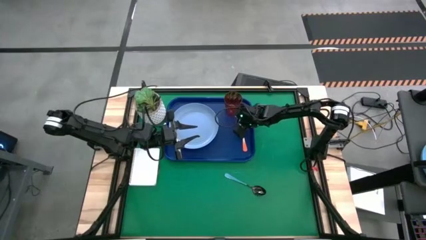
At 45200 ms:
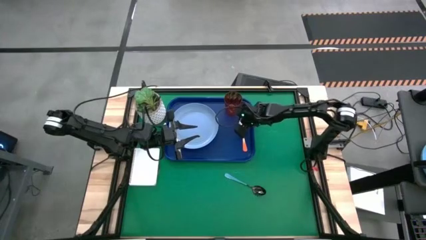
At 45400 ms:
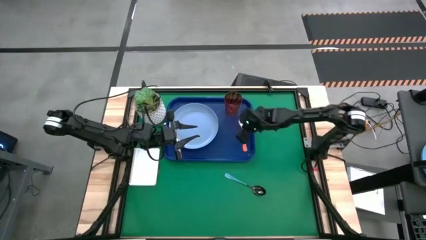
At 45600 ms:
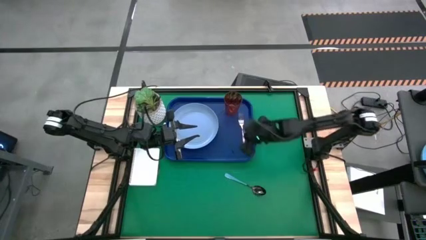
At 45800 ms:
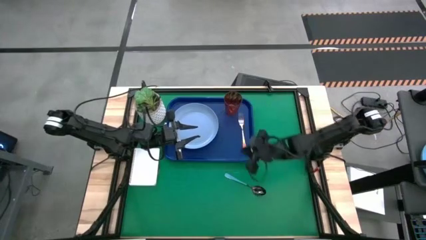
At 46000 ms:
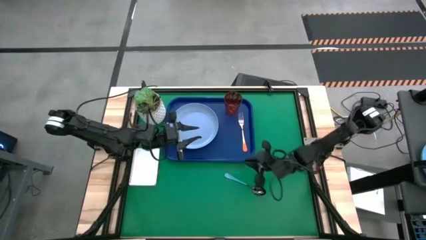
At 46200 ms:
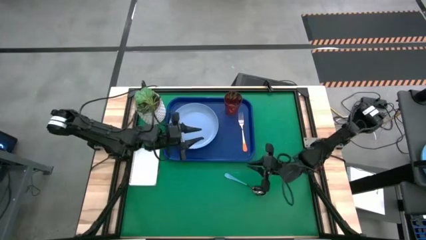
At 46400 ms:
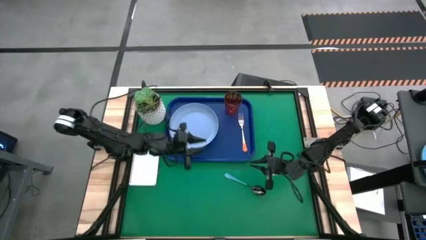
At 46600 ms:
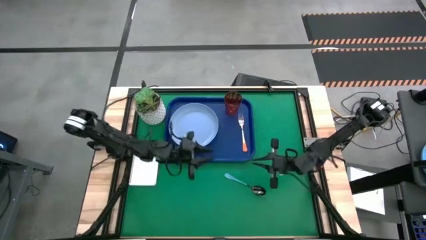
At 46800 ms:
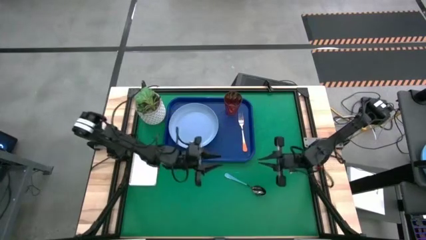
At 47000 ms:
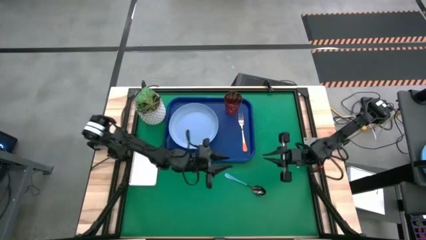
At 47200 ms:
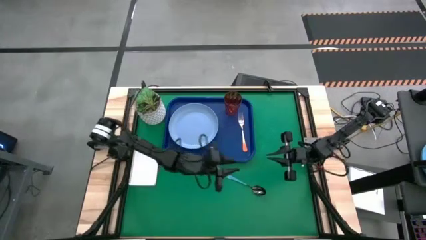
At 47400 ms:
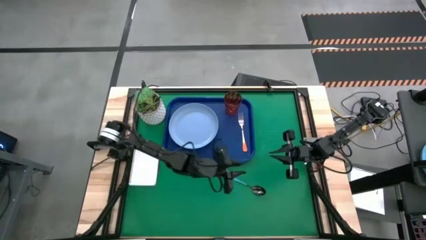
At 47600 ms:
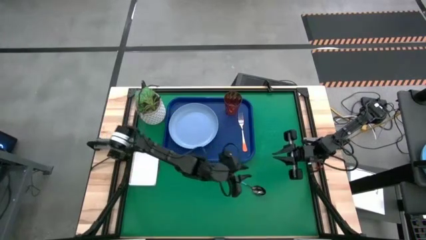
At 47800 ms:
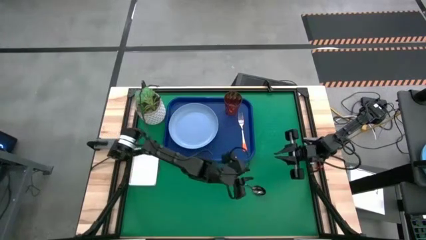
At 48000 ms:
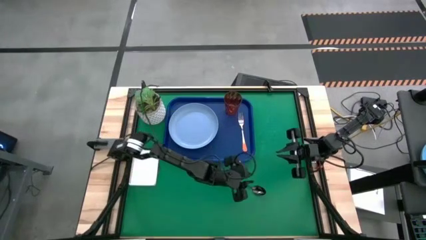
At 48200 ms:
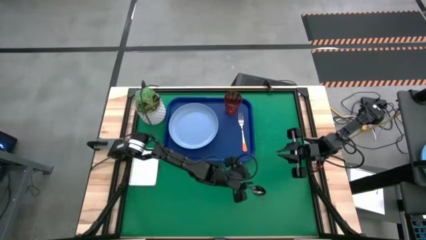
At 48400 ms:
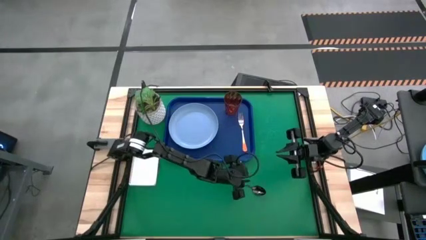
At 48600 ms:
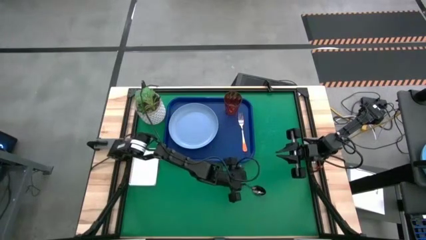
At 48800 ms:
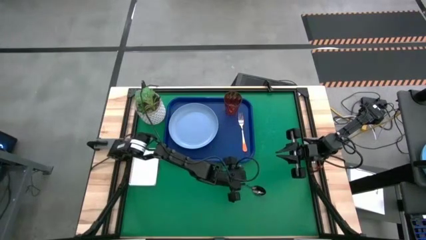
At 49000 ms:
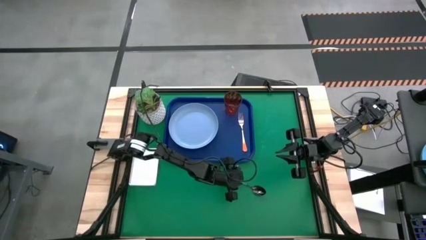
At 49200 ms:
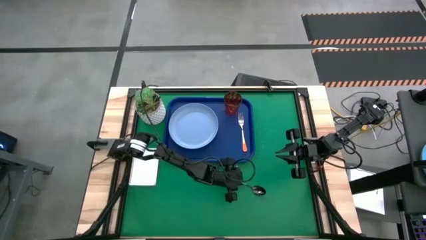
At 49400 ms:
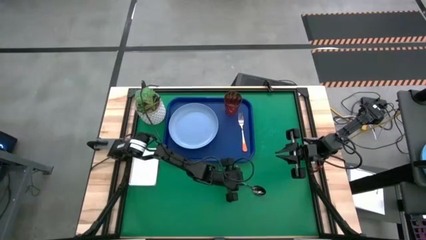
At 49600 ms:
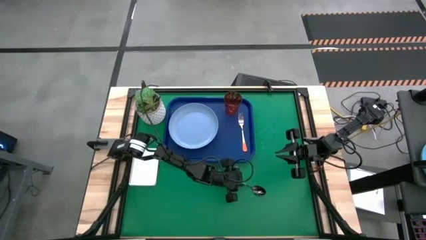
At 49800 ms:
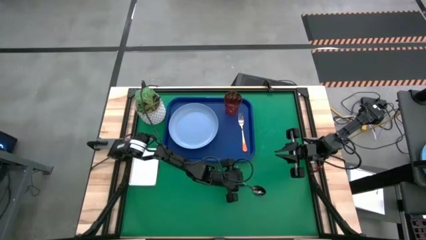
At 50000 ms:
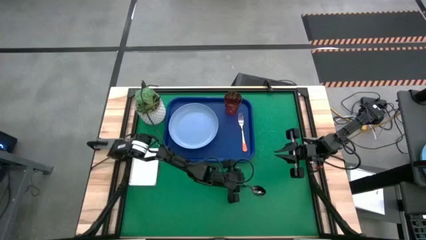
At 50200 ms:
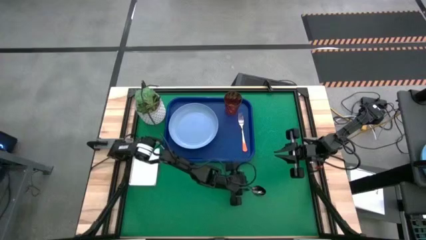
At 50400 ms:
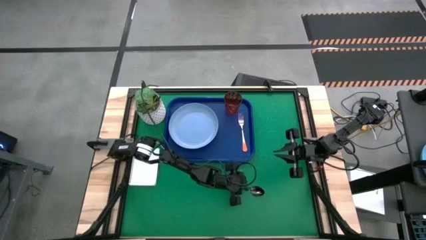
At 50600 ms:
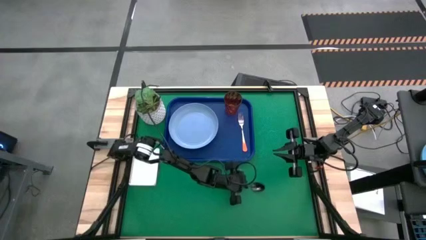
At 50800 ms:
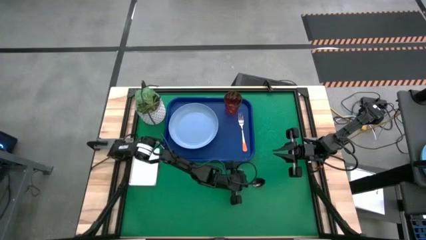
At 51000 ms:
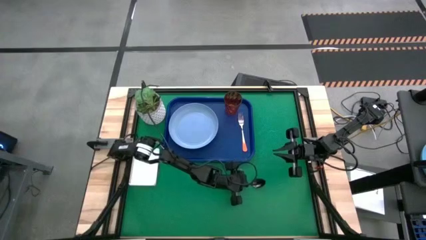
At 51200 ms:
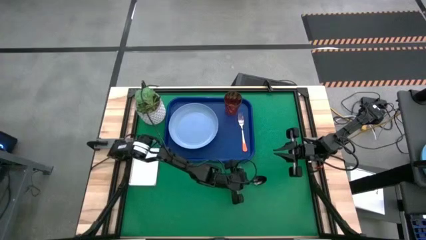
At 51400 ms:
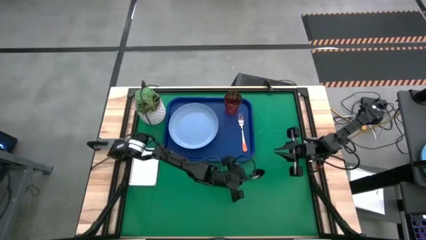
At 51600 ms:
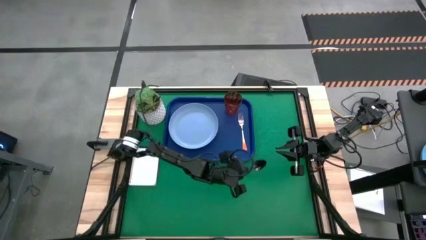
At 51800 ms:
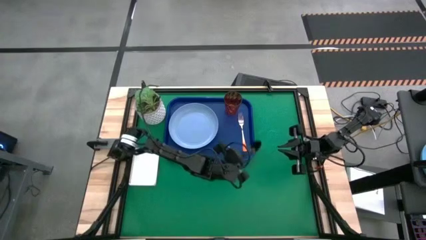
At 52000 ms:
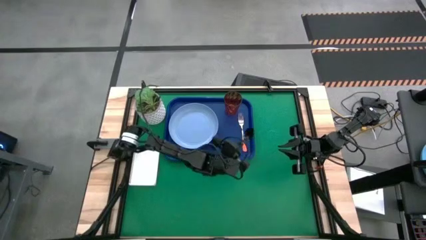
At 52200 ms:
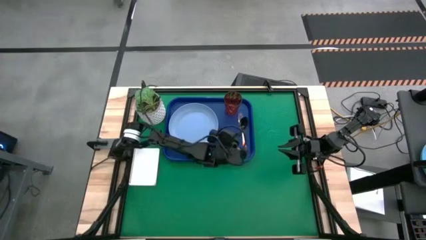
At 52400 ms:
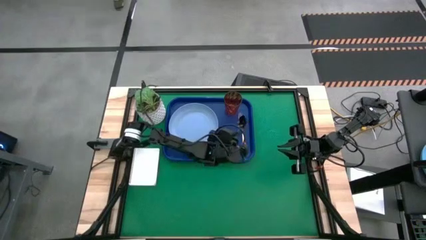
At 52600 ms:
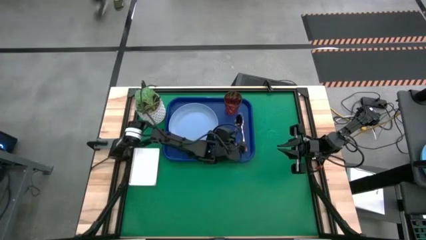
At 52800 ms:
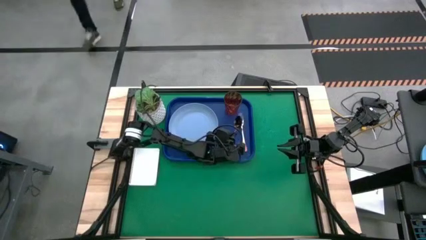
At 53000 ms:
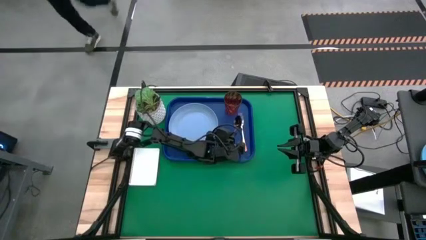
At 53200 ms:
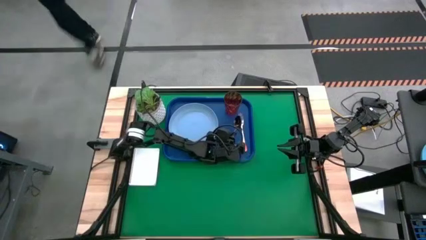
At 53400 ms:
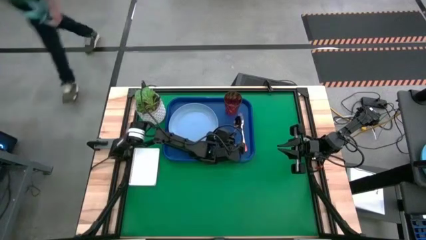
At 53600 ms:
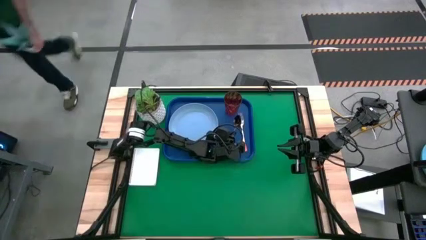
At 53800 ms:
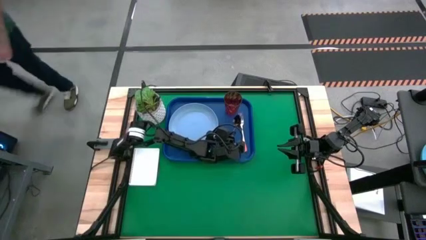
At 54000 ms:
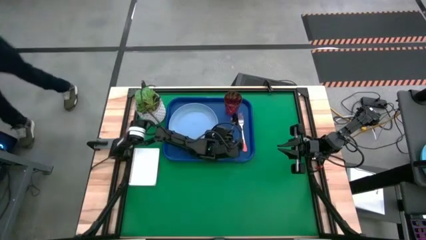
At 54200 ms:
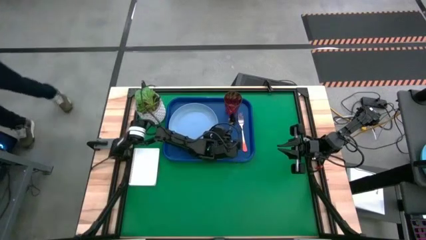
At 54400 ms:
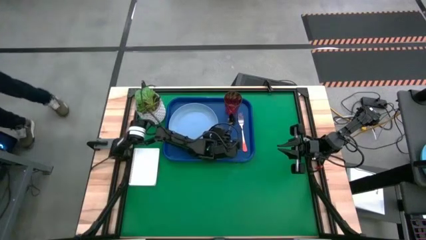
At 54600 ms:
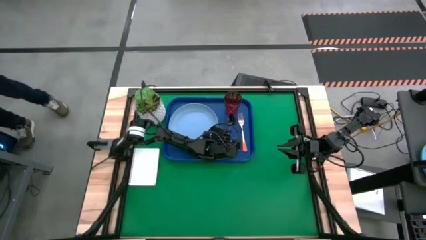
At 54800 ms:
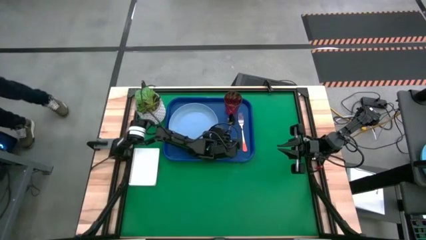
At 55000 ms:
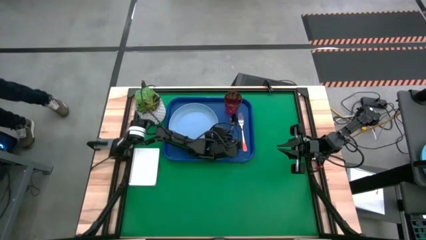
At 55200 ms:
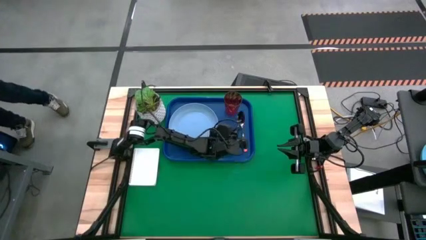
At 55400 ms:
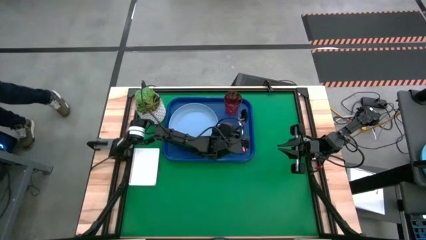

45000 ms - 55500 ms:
Task: Pick and place plate/cup/fork/spoon on tray
Put the blue spoon on the blue serving tray to the left side of the orange fork
